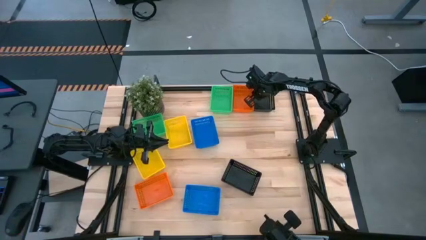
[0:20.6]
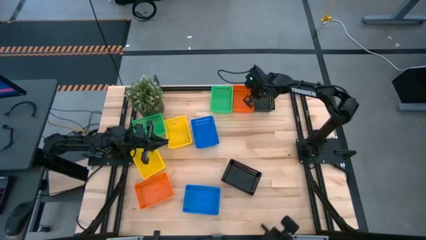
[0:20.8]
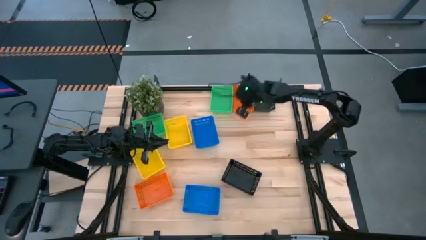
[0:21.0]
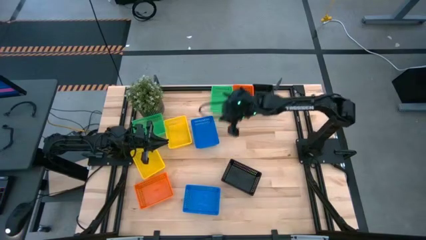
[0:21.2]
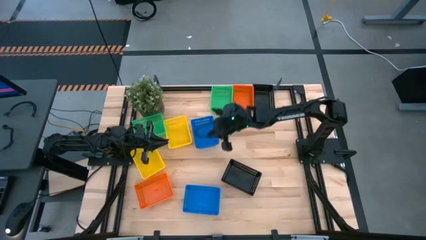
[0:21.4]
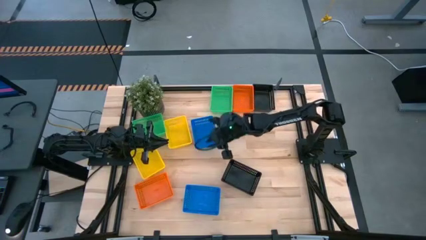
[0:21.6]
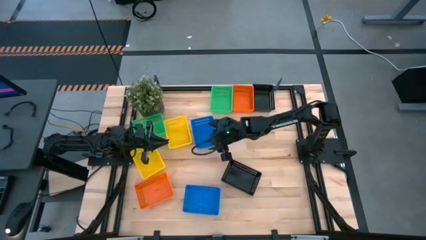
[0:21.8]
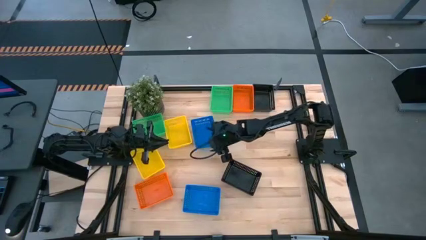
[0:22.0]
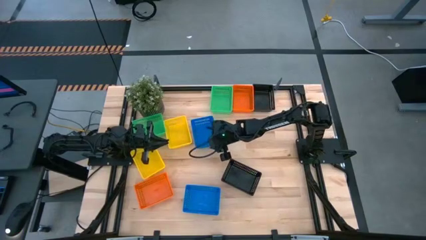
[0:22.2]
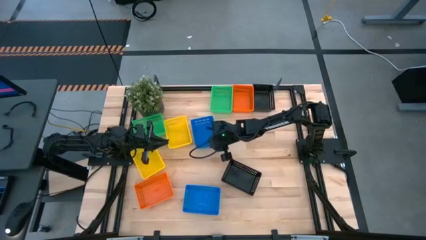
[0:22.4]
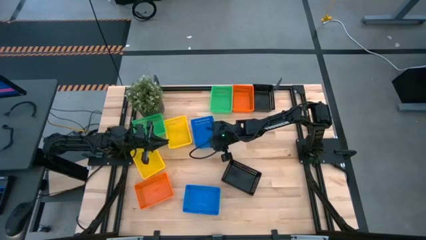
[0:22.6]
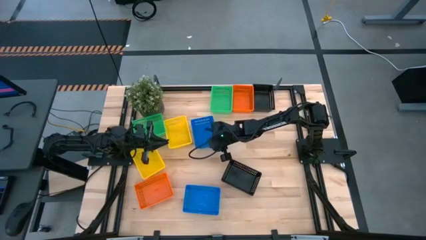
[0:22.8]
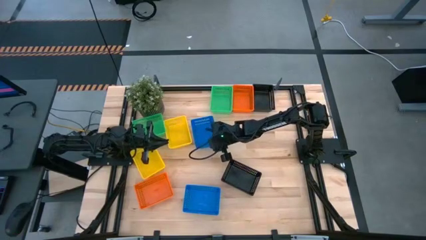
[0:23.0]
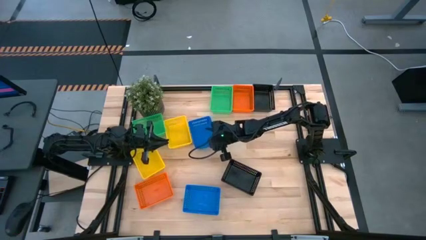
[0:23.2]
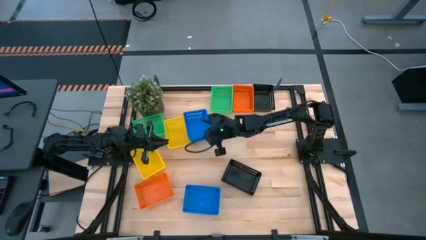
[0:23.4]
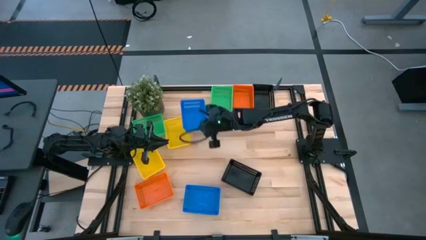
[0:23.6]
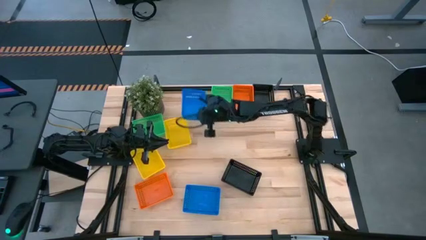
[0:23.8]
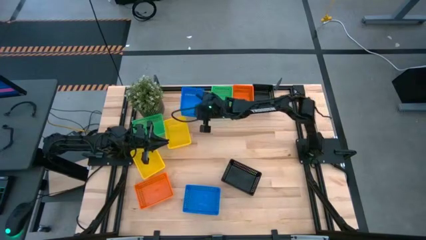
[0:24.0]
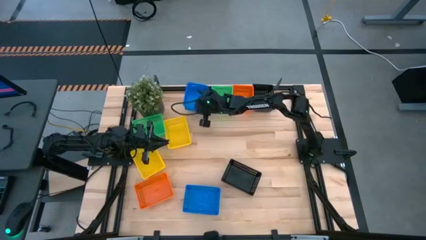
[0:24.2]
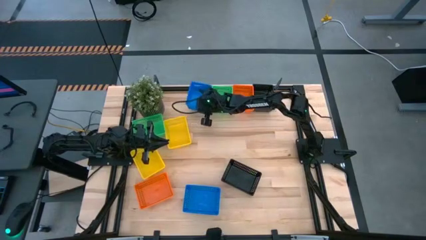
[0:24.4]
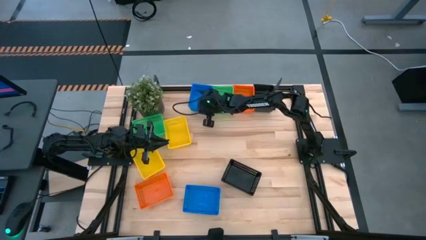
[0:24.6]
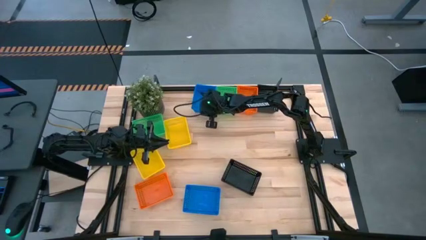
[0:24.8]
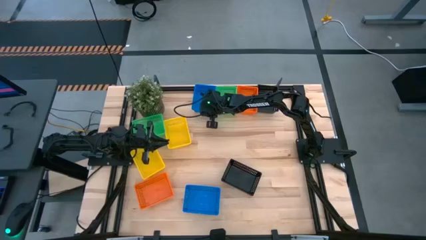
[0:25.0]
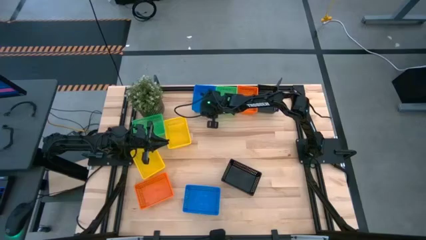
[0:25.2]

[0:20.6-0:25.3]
Move the top blue bin to the top of the table to the right of the green bin

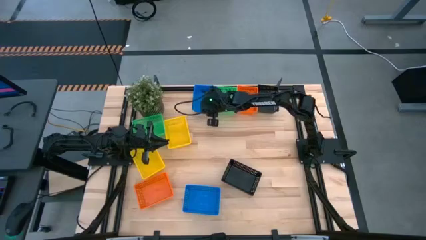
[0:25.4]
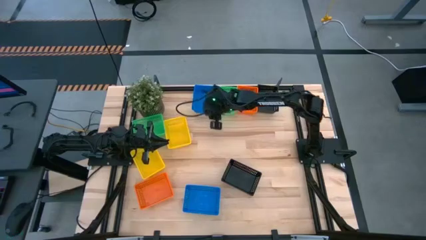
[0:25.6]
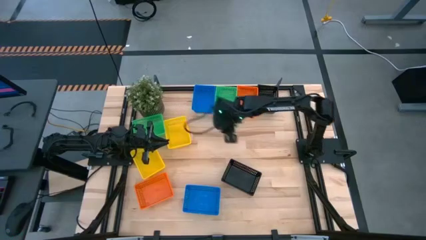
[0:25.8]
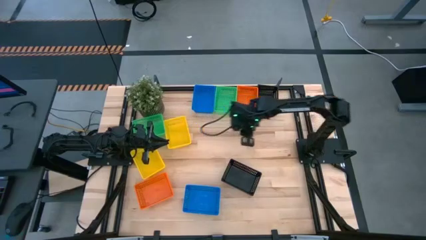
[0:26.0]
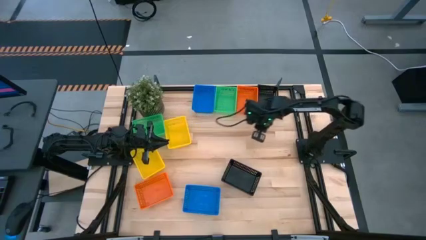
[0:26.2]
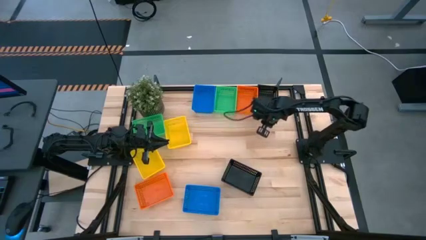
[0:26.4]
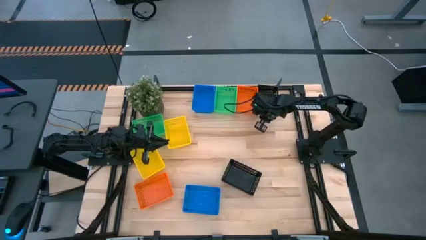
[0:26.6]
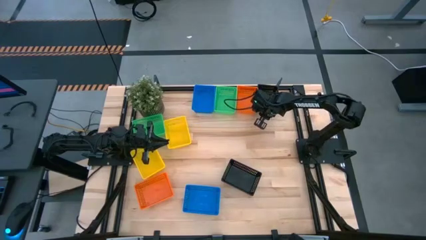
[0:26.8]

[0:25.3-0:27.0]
Adjust the black bin

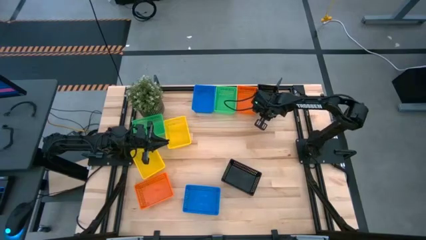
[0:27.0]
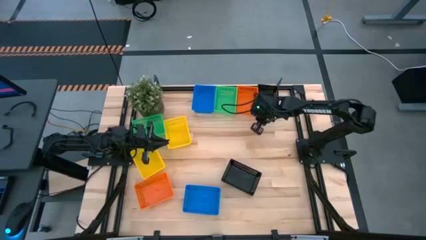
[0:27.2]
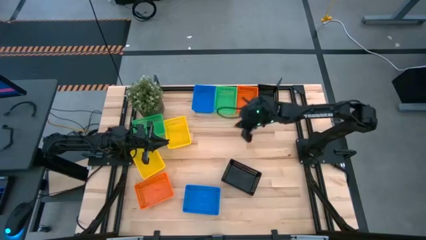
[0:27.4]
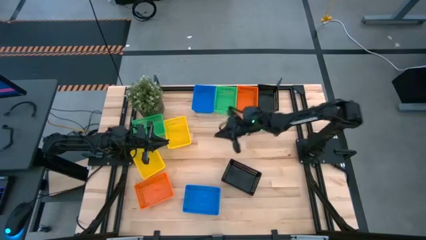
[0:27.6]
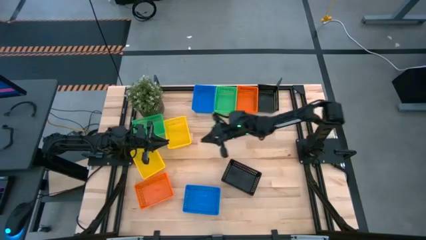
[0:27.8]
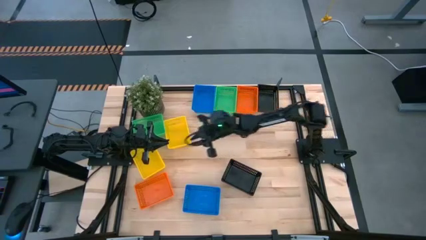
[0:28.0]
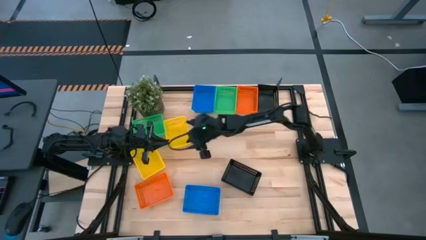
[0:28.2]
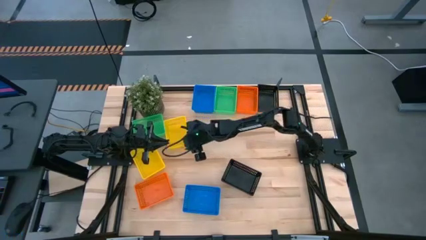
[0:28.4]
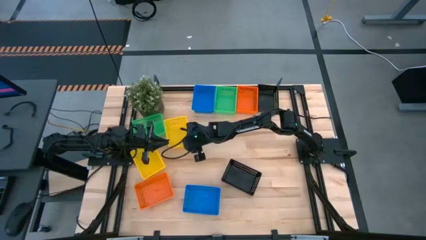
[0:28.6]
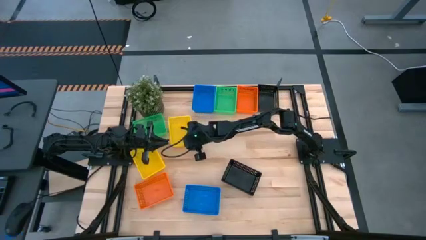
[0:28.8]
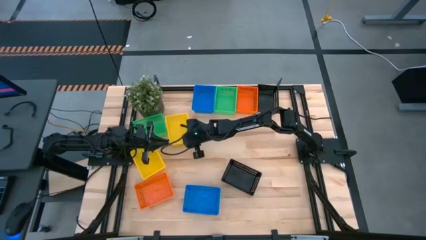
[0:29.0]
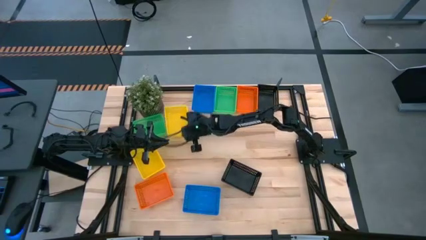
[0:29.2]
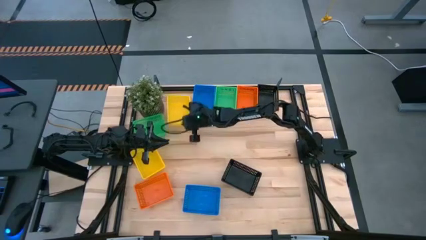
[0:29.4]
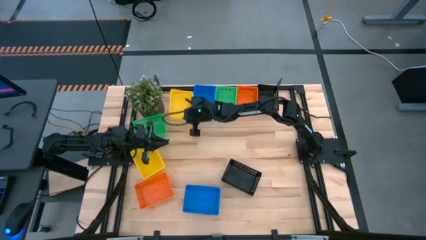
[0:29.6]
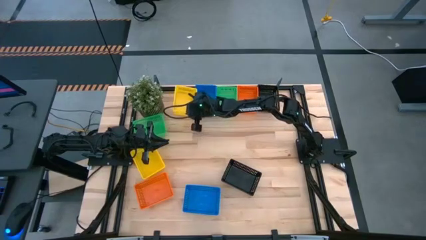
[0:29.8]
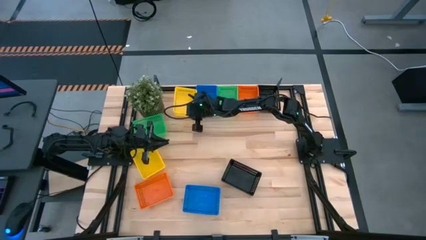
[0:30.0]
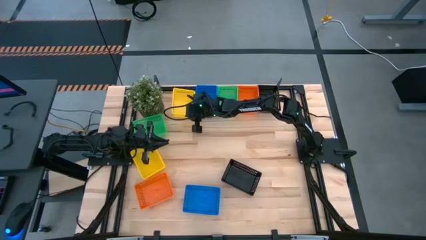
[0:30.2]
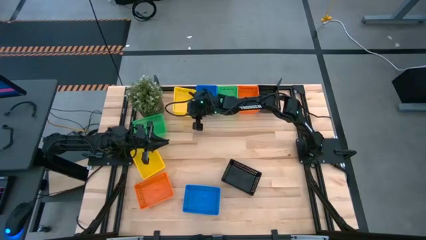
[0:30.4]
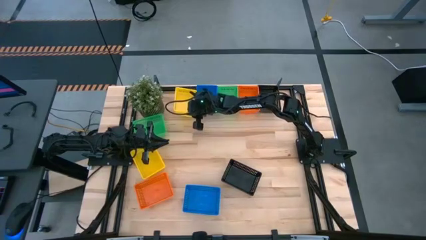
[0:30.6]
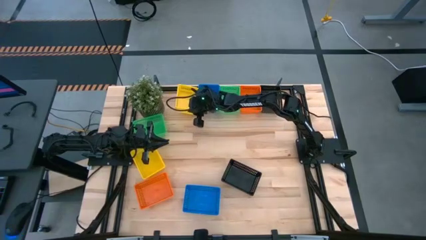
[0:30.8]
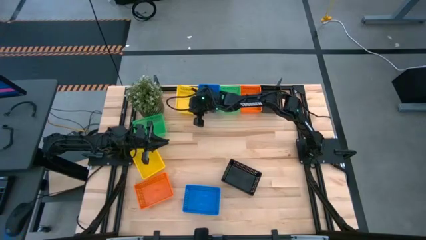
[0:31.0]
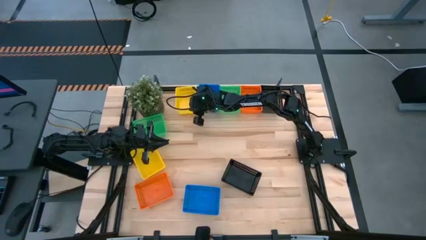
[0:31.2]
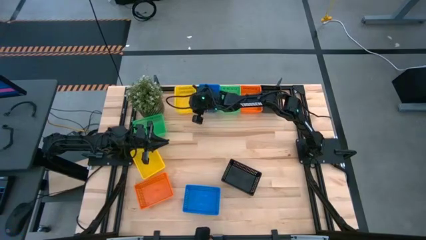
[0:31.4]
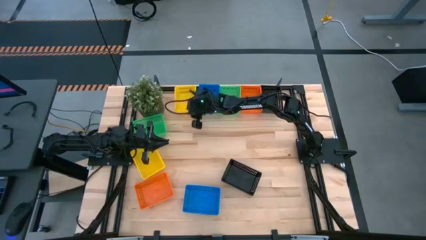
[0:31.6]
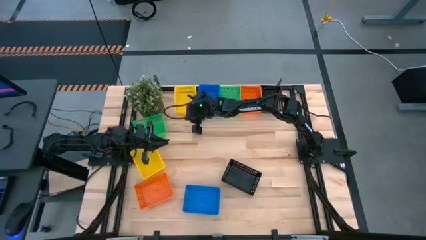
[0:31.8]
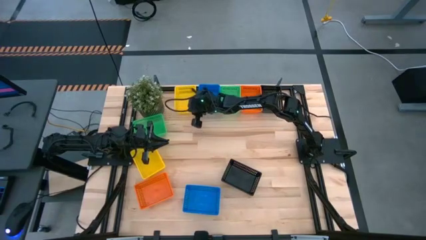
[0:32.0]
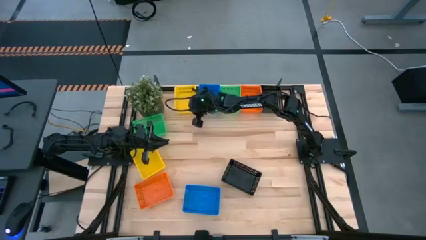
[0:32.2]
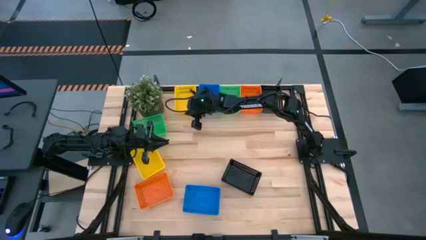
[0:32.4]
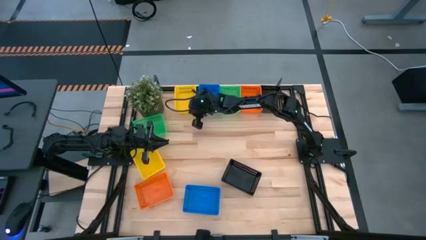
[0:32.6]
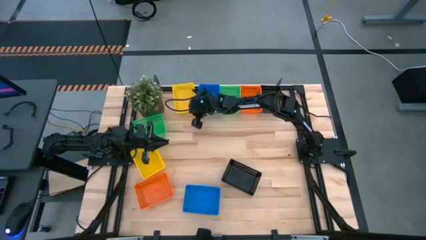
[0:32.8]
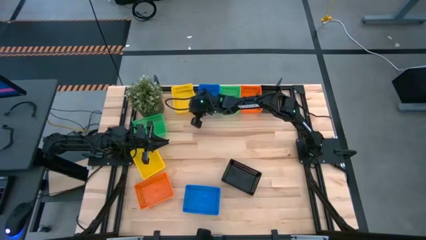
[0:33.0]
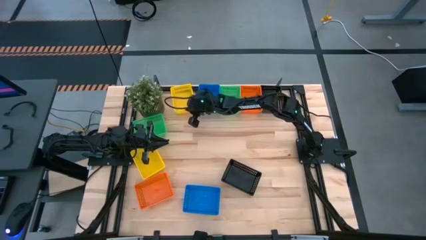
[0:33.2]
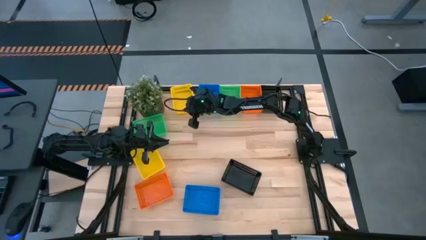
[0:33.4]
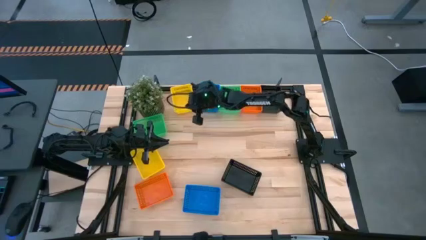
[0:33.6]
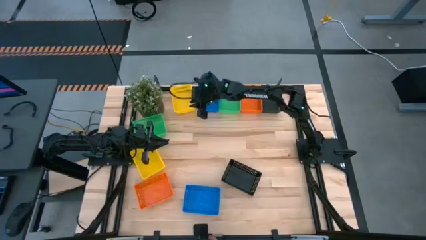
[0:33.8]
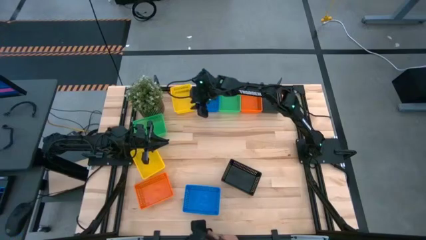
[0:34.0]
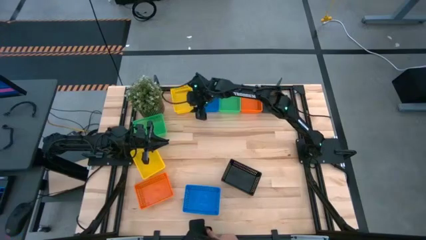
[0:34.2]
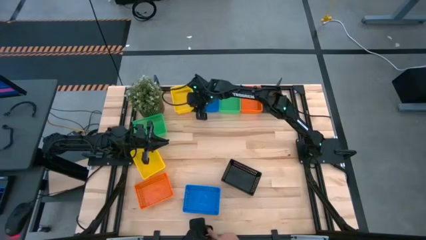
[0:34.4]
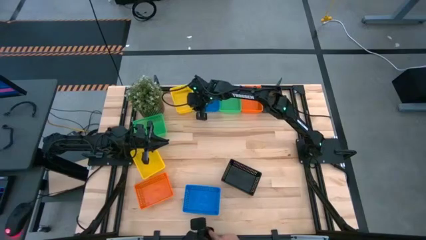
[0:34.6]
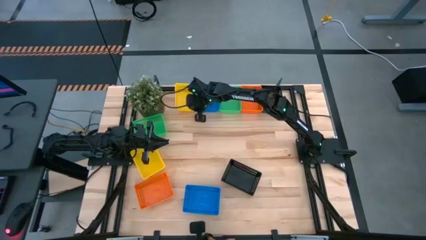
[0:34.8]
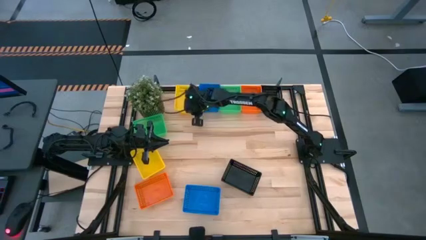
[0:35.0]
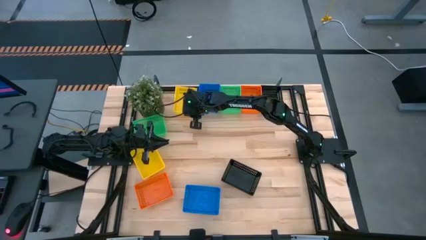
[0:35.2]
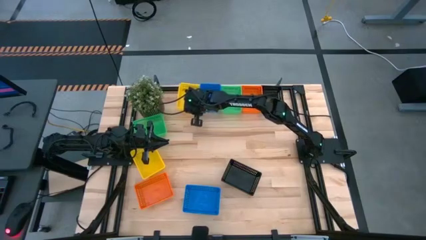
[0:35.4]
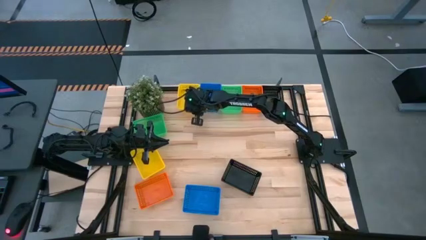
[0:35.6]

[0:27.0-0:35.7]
Move the yellow bin to the top of the table to the right of the blue bin
